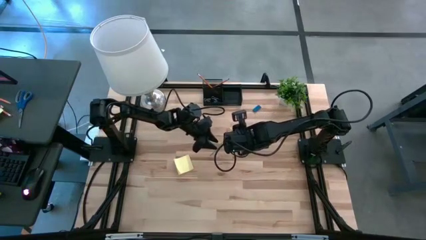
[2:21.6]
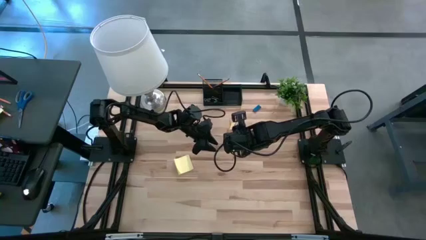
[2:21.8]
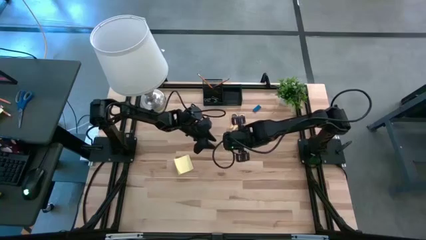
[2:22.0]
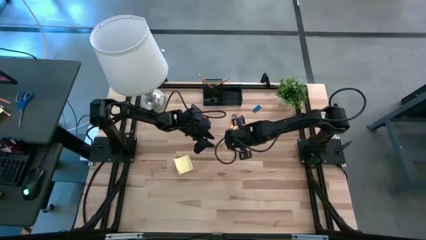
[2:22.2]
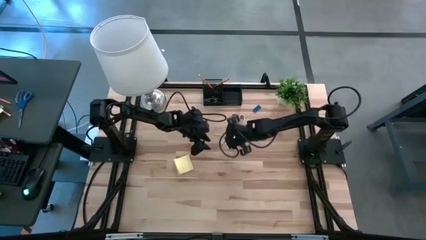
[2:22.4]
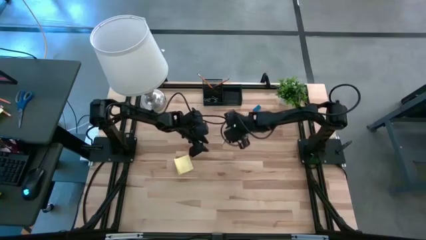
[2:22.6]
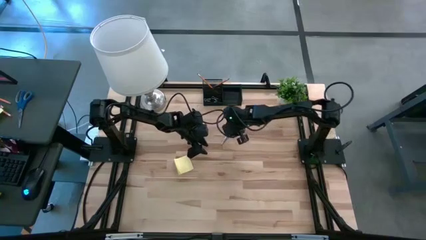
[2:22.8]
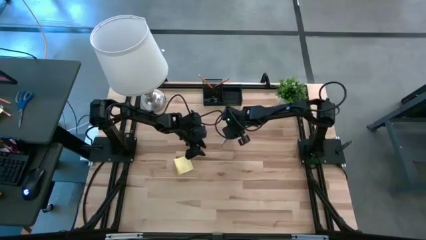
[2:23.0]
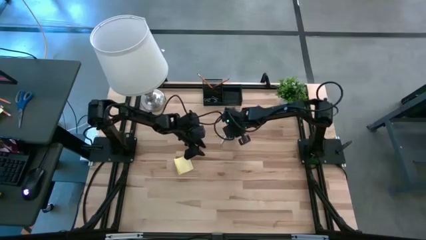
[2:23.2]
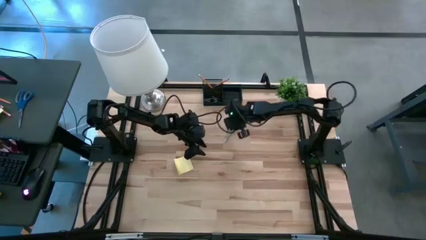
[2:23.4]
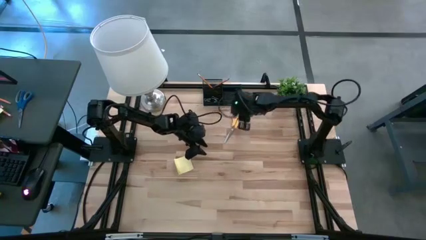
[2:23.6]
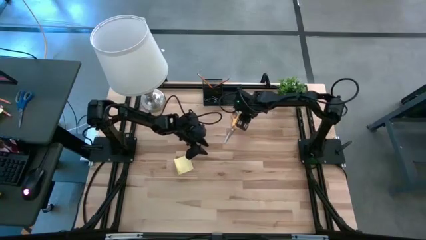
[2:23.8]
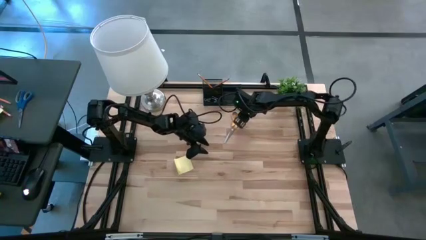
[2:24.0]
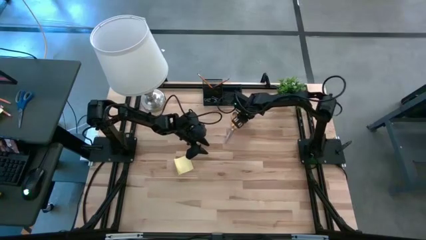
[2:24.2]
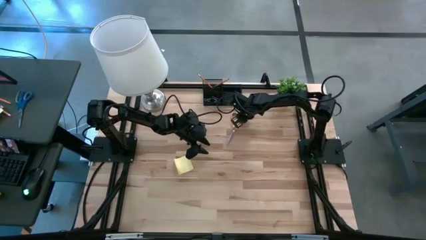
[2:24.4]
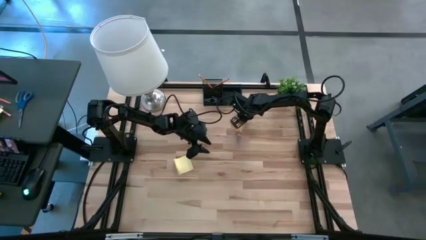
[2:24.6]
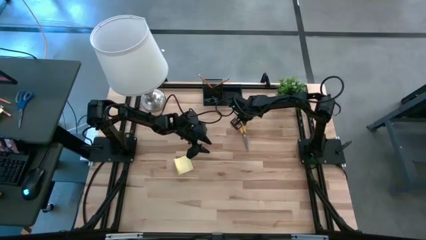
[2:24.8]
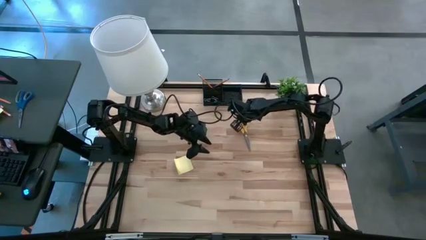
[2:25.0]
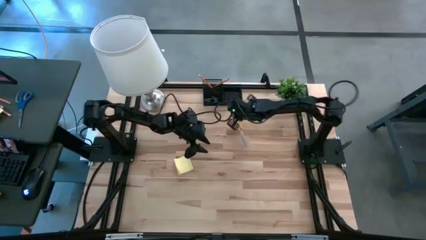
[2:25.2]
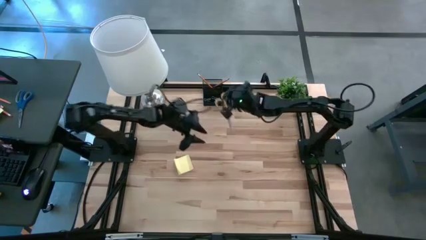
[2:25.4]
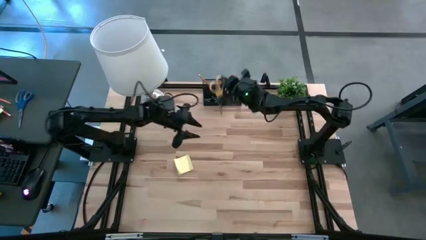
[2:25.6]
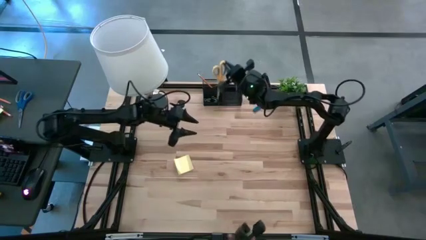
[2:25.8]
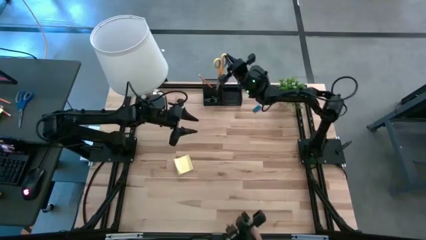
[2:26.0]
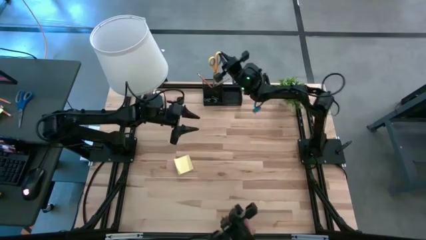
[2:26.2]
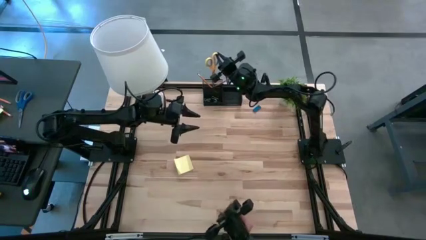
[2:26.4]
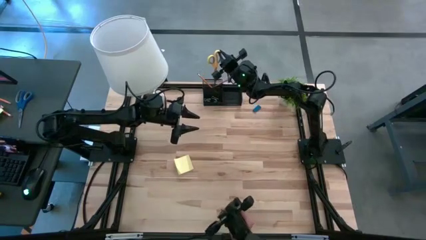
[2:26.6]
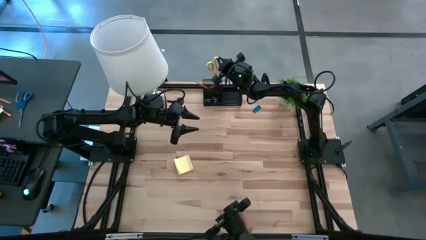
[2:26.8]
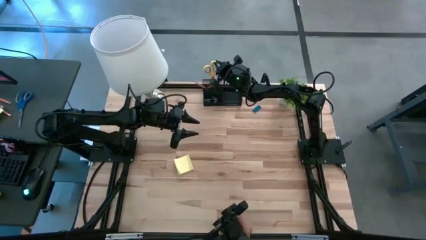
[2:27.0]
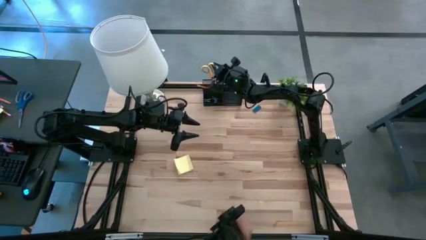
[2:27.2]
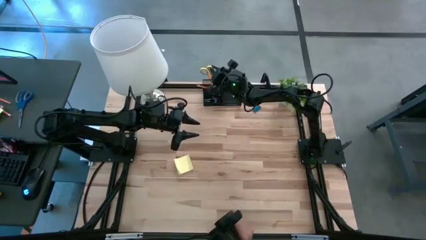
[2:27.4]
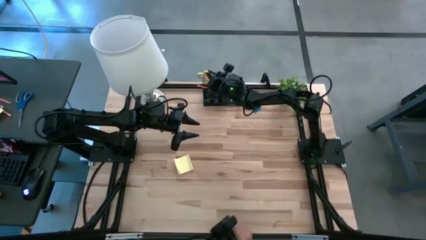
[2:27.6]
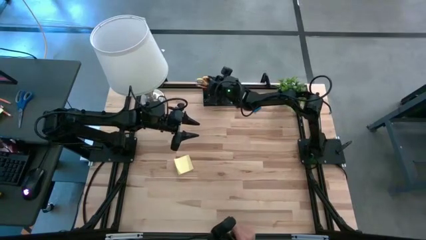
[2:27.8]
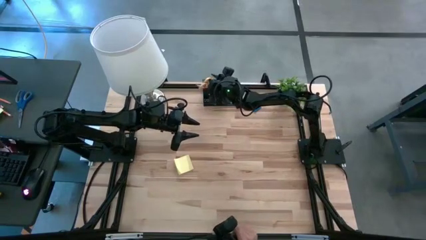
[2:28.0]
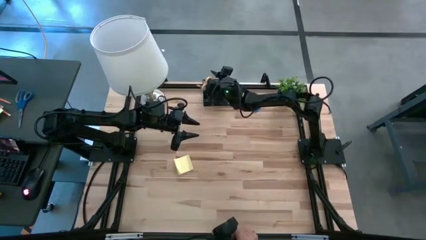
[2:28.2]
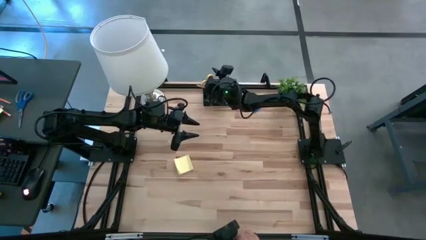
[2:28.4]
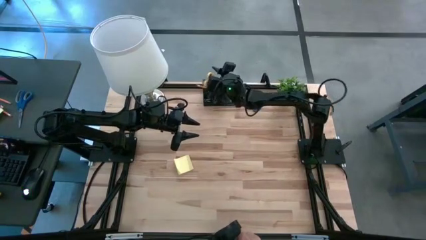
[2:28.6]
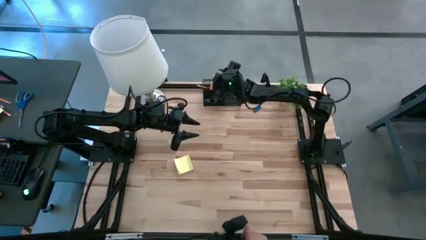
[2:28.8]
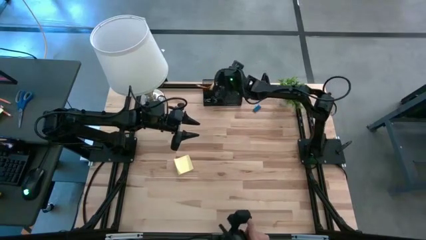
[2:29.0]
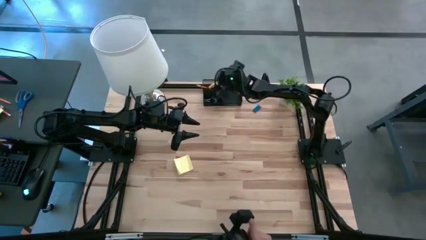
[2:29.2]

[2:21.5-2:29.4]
Task: Pick and place office supplies into organizer
Put the scissors into the desk organizer

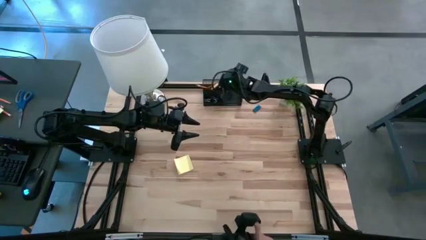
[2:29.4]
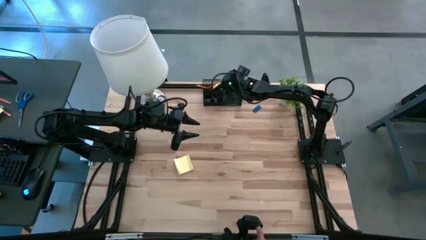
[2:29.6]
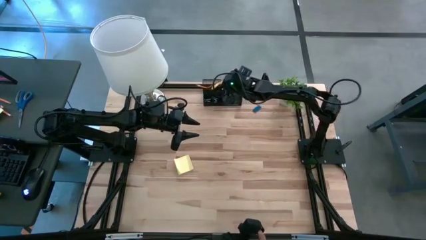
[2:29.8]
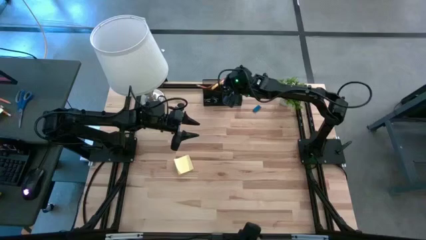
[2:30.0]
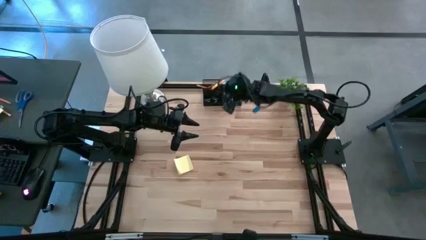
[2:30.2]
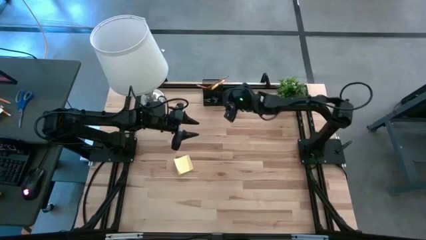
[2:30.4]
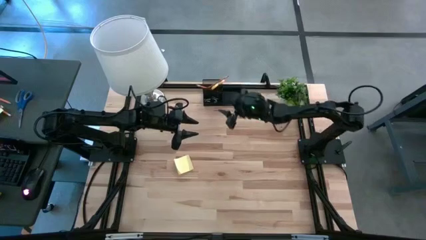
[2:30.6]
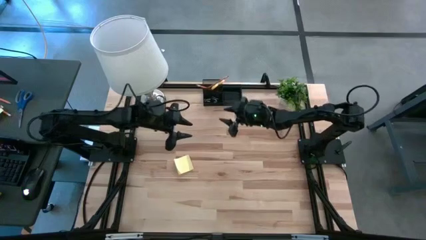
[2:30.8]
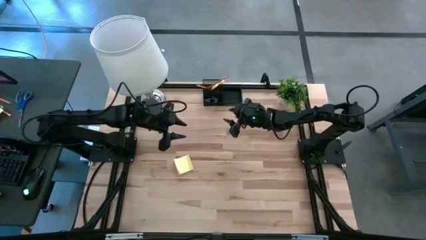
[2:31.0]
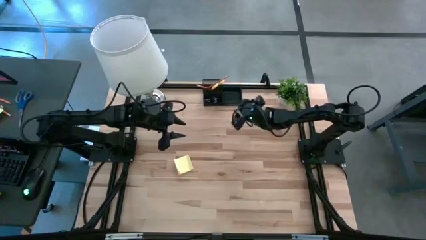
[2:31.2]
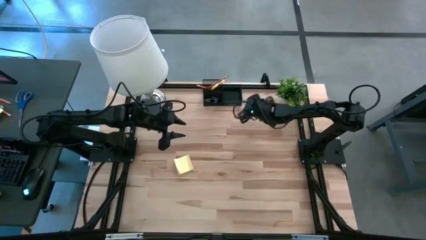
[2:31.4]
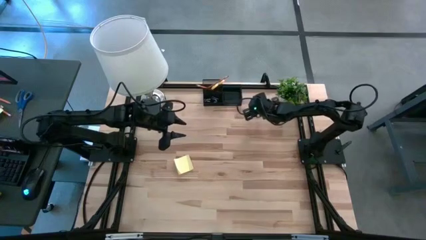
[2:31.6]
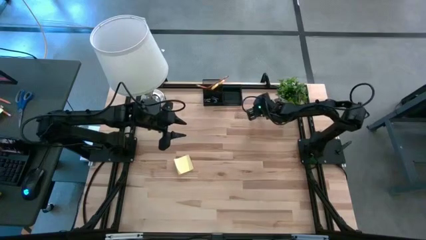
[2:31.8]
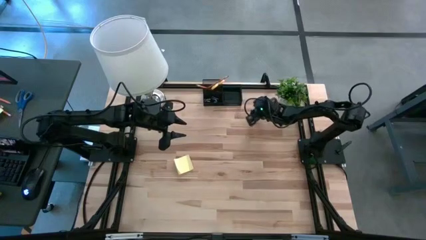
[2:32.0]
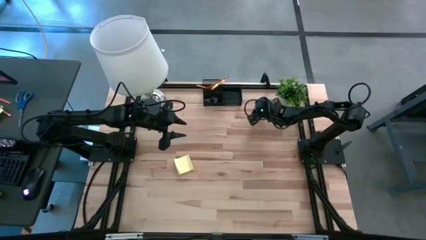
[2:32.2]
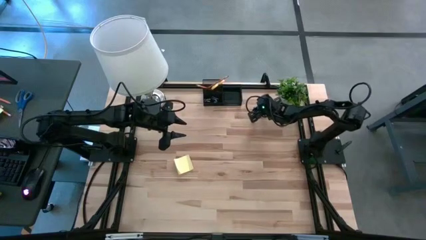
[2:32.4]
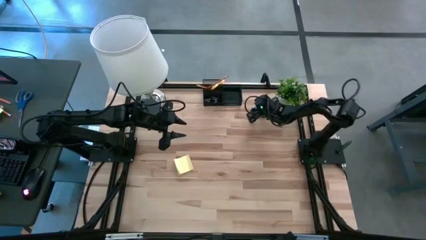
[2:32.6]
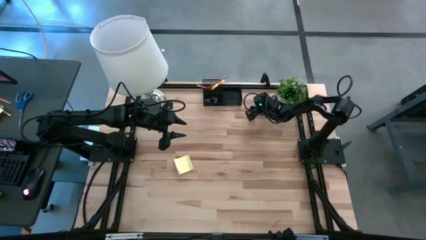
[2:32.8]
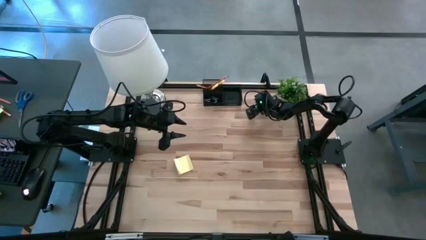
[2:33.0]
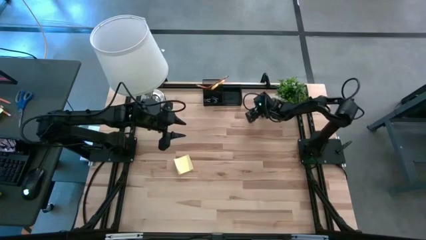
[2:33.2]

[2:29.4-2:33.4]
Put the eraser into the desk organizer

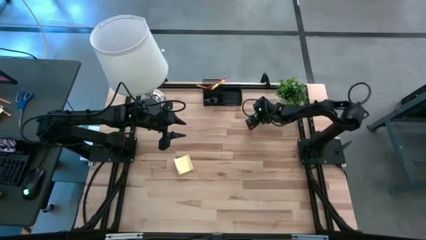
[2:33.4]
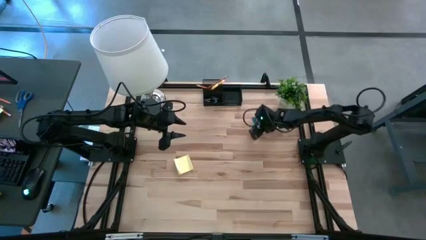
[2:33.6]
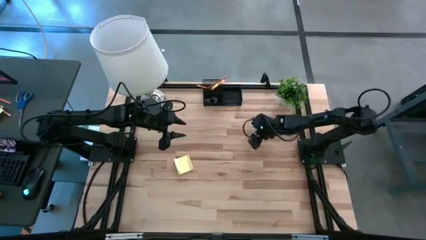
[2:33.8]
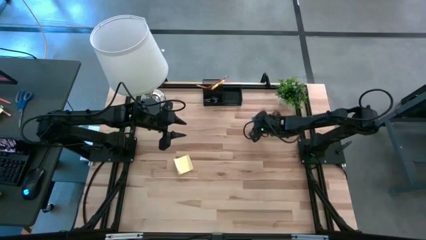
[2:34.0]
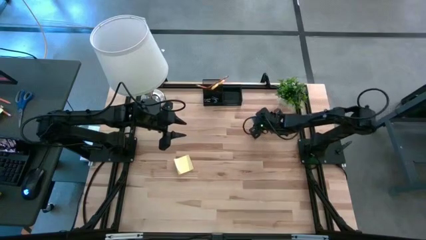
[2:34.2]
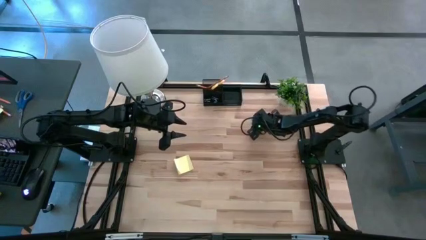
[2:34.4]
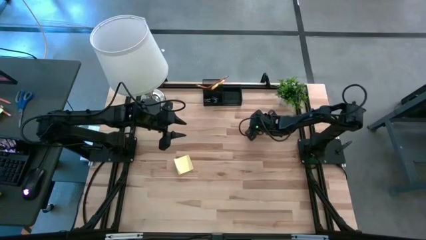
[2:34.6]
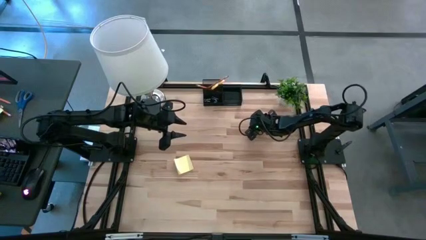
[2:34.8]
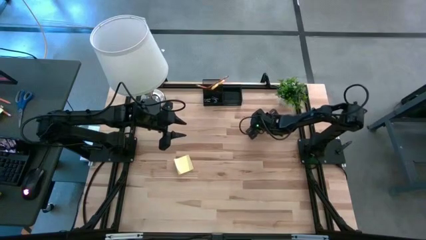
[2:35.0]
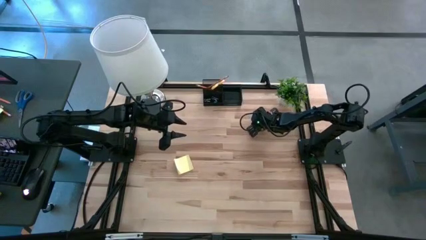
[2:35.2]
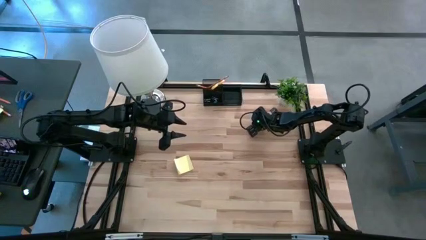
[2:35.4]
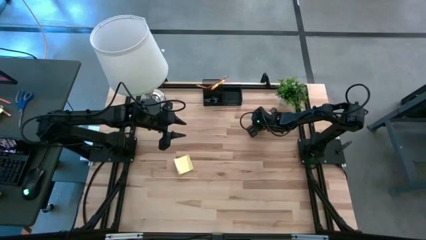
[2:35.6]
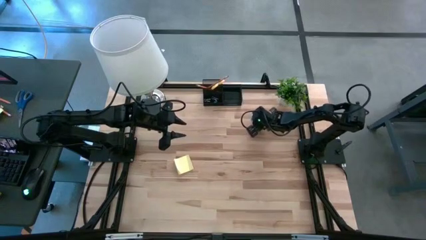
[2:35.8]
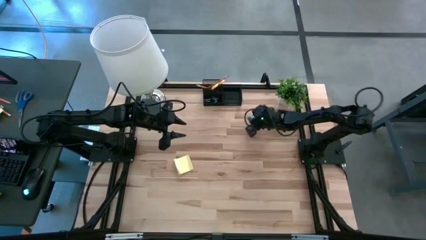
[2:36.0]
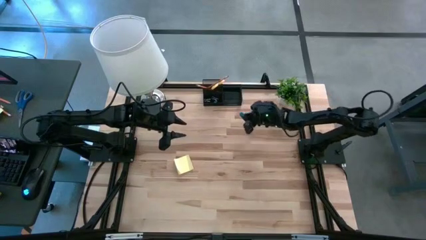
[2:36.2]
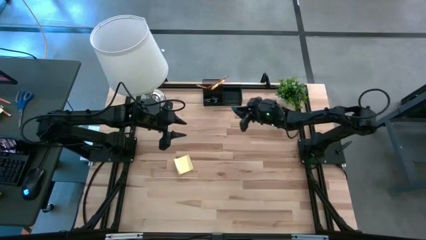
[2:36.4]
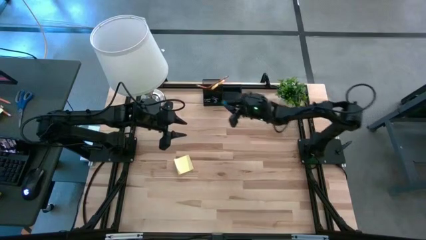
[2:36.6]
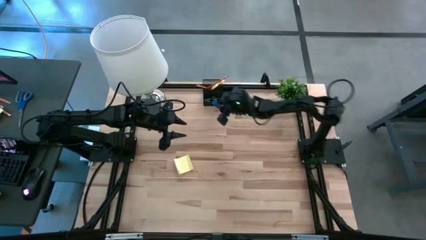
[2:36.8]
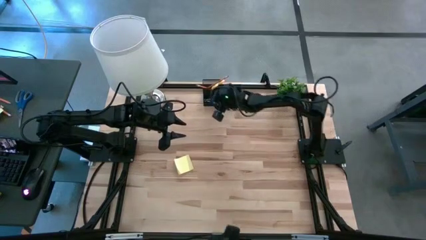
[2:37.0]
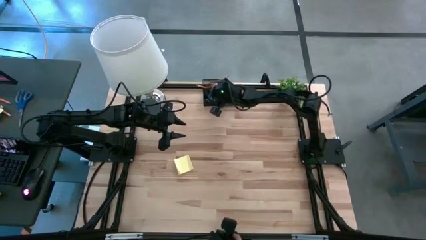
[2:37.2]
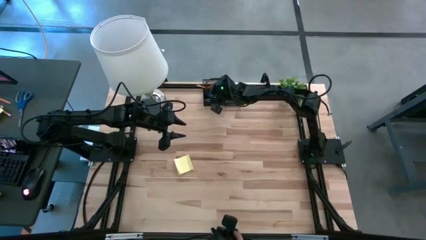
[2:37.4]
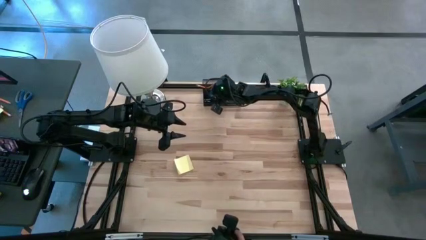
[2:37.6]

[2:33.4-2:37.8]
Put the eraser into the desk organizer
